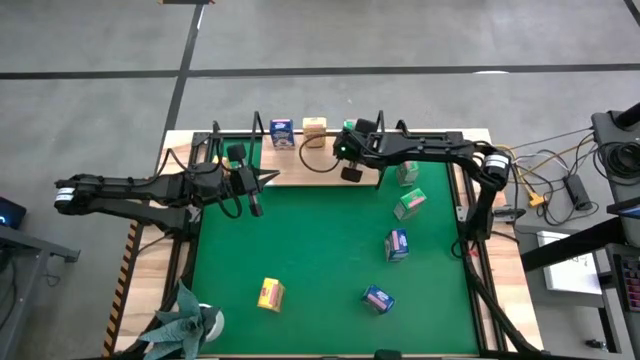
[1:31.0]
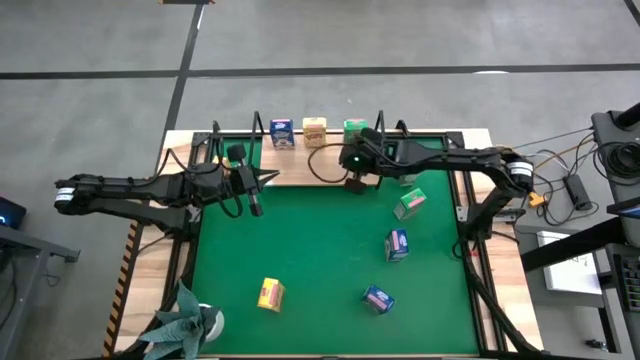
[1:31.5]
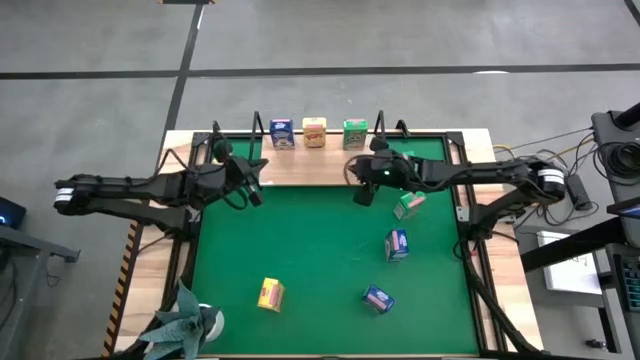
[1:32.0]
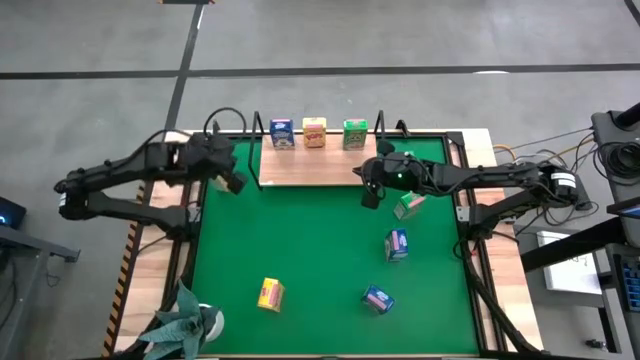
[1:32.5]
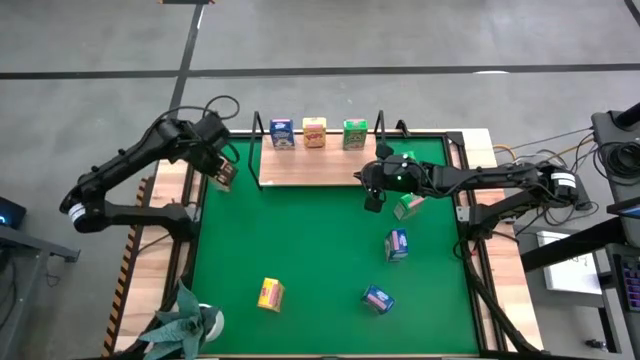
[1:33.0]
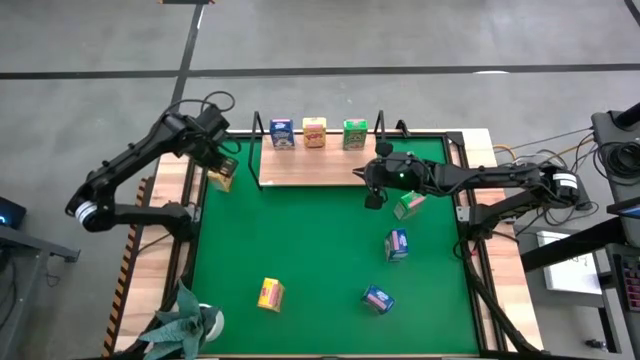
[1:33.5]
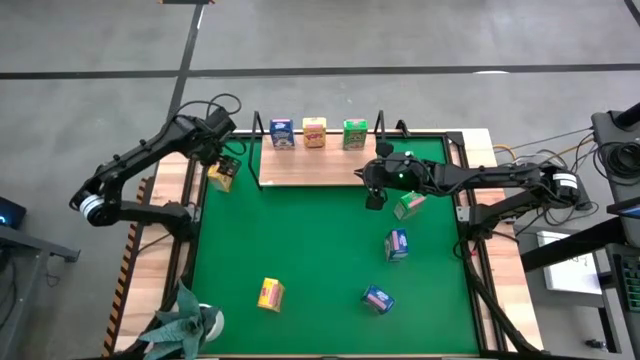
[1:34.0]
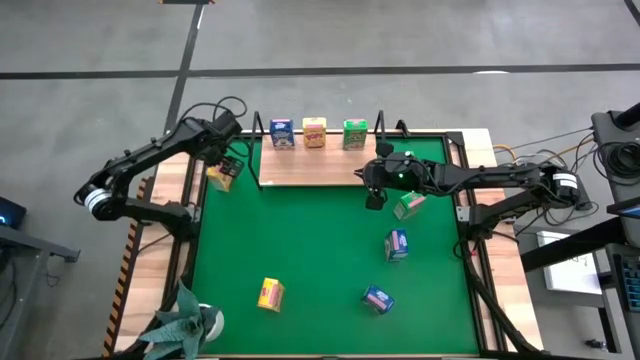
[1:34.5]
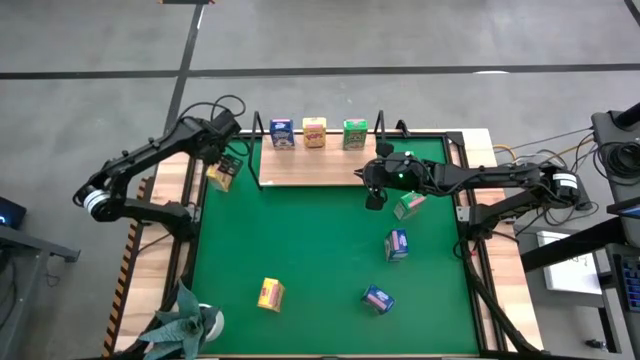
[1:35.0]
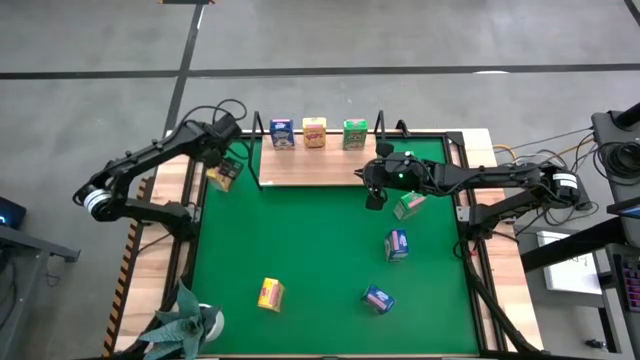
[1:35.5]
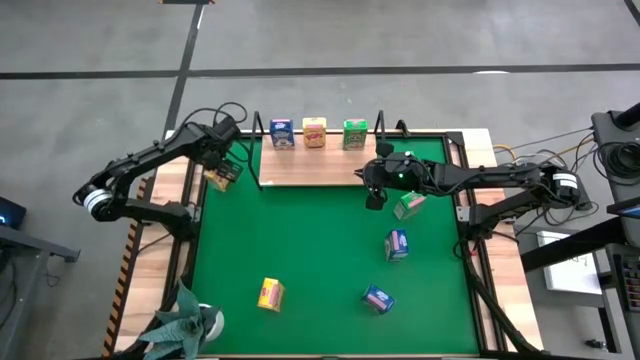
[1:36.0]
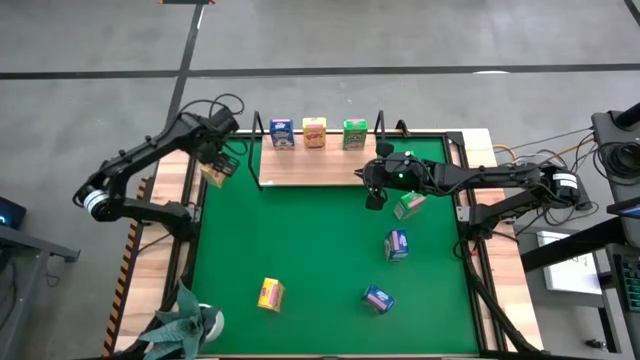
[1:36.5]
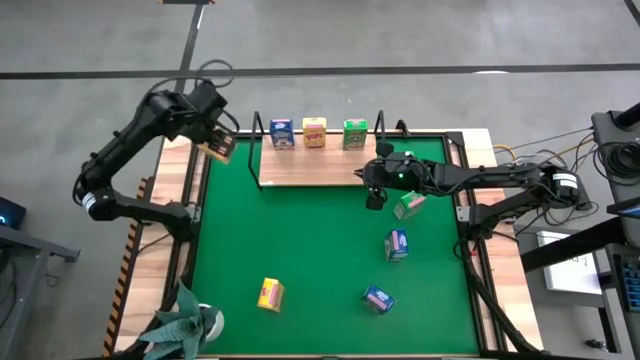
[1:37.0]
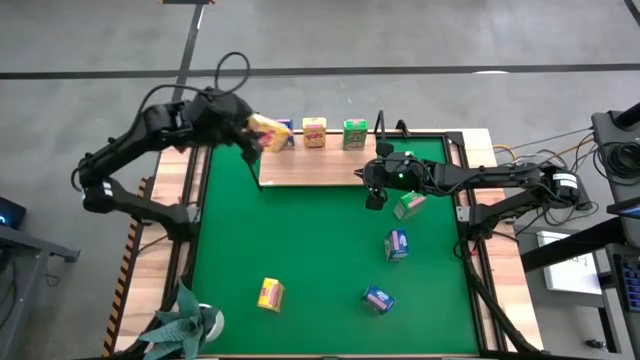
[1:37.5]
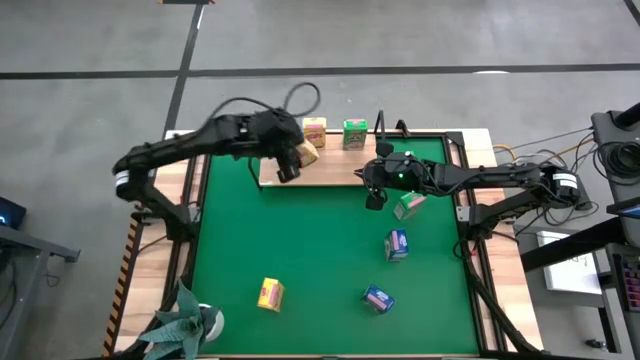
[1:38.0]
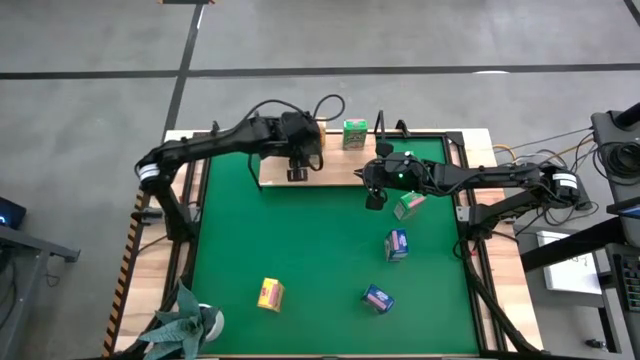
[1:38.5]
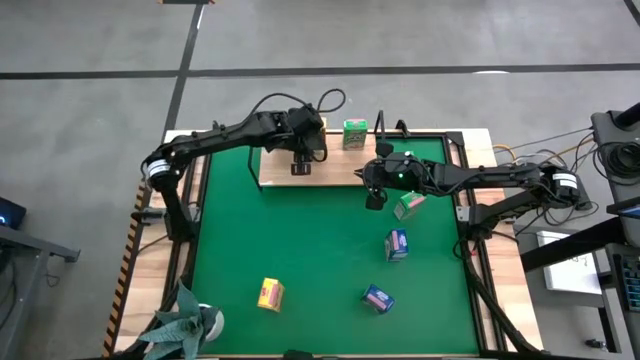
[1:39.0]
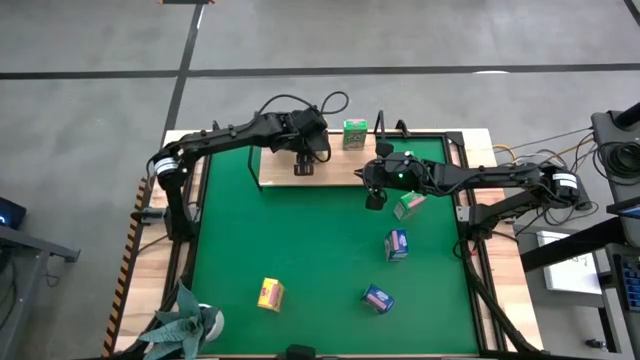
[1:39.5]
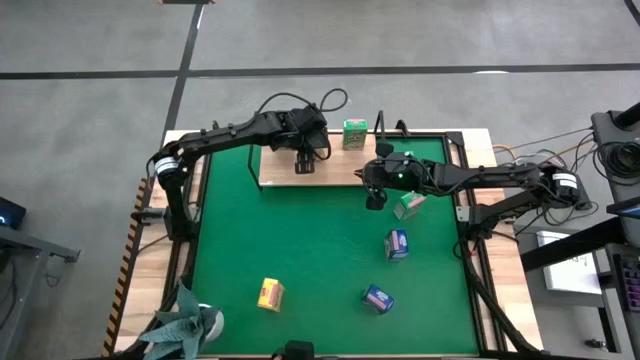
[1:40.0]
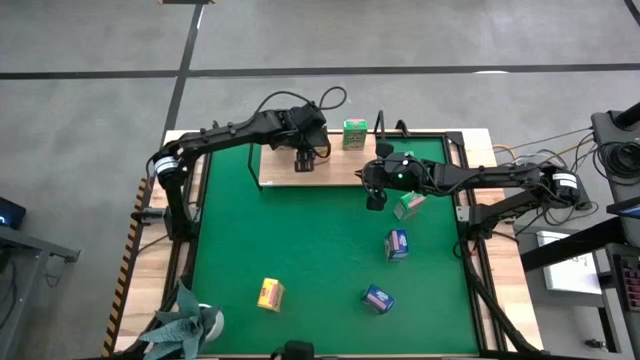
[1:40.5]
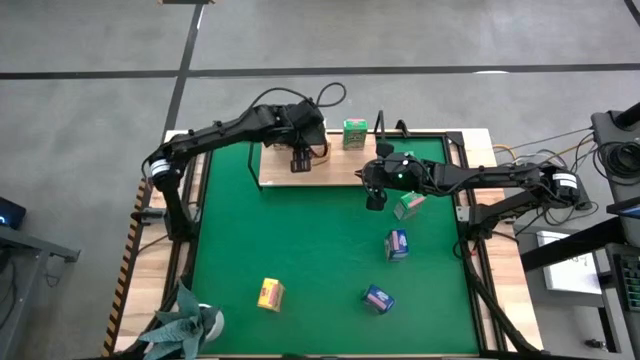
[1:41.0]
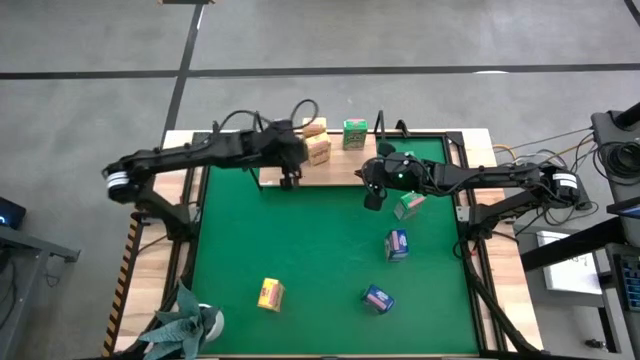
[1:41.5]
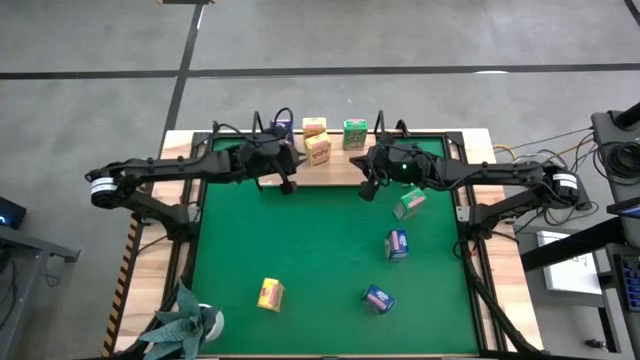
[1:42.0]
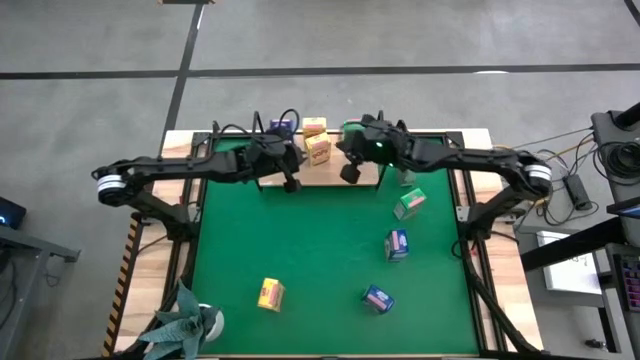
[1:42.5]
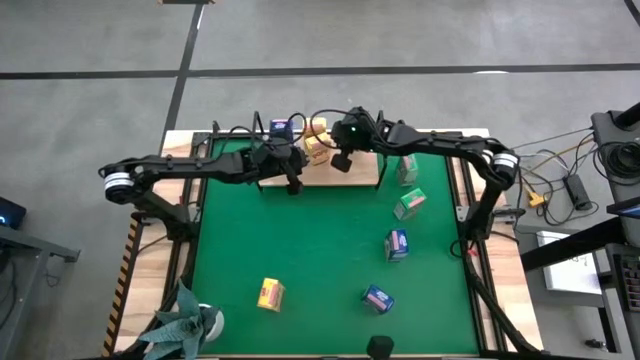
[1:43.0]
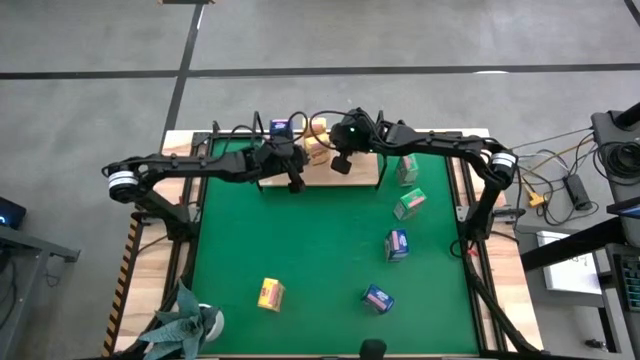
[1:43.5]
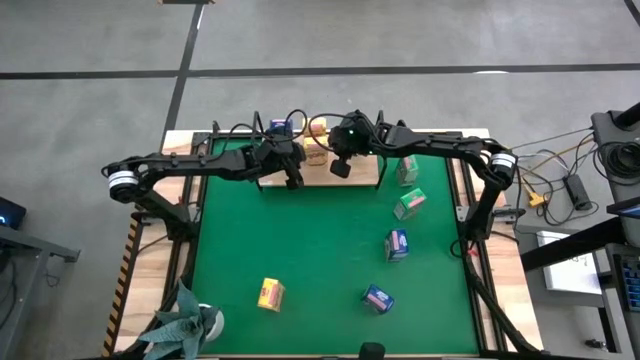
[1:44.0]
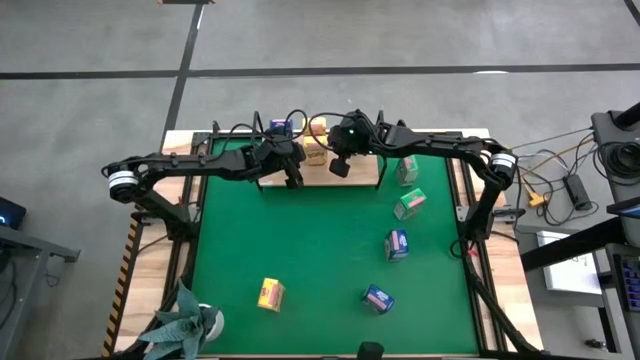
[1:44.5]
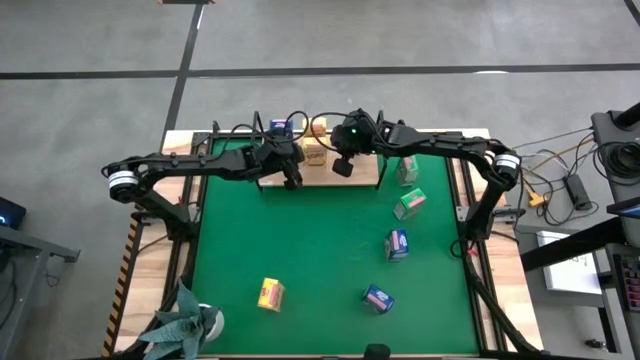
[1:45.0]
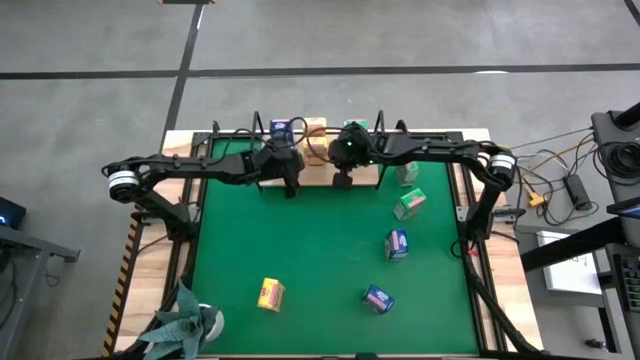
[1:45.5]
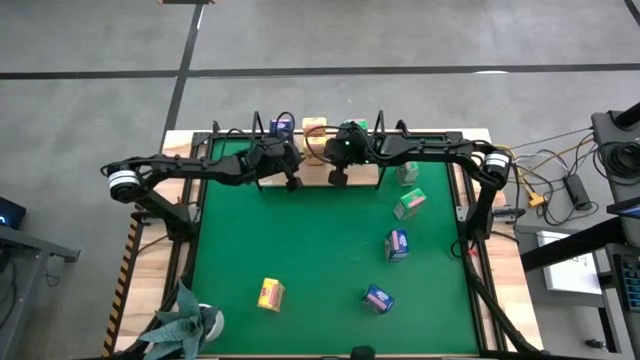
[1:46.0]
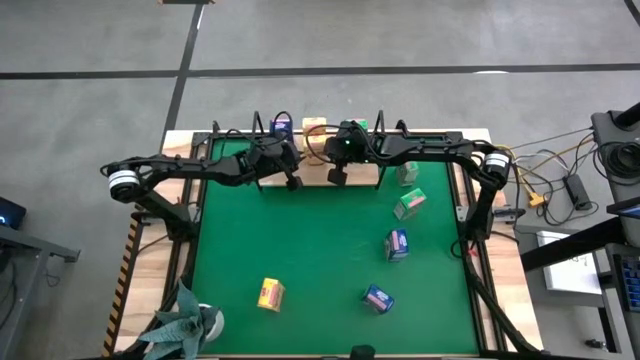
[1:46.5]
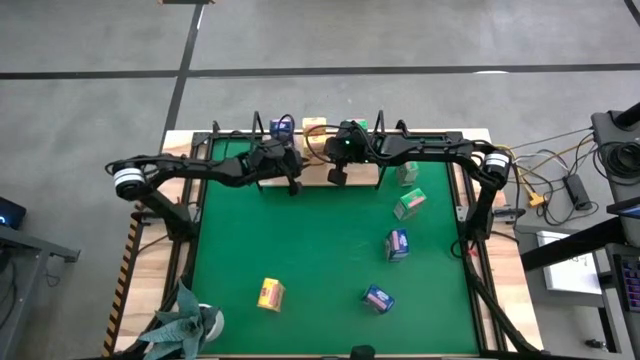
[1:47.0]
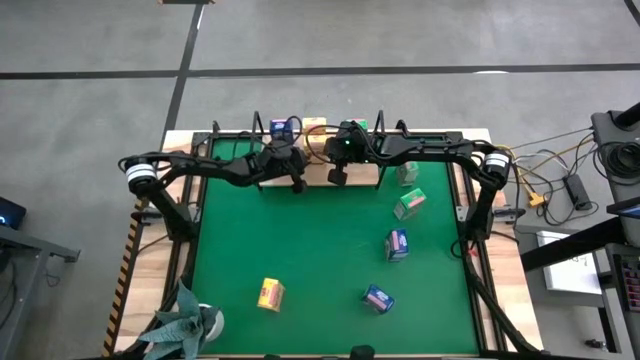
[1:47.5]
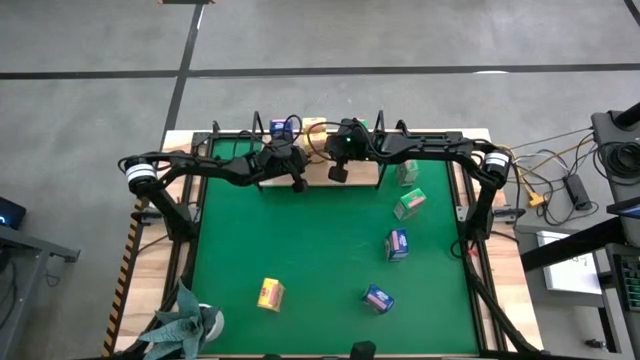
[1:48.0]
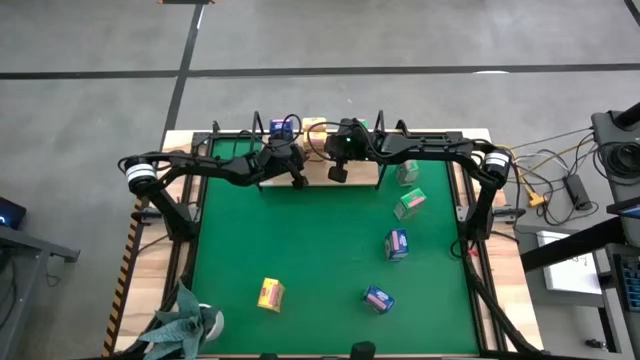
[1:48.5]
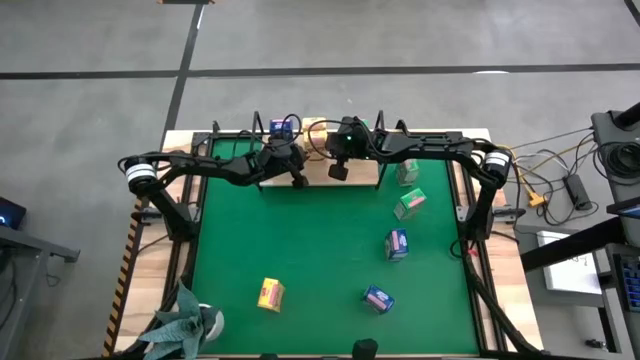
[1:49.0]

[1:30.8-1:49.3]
Task: Stack cereal on shelf
Put the top yellow cereal box on the shelf aligned with the other yellow cereal box

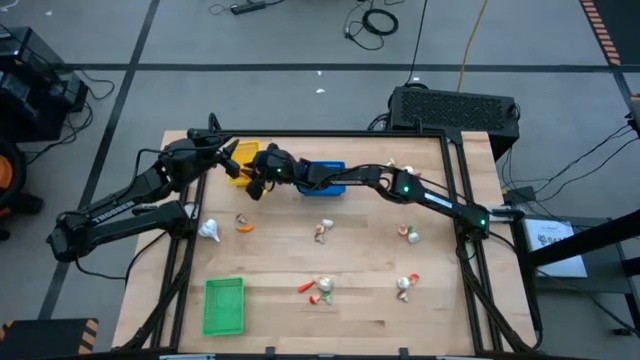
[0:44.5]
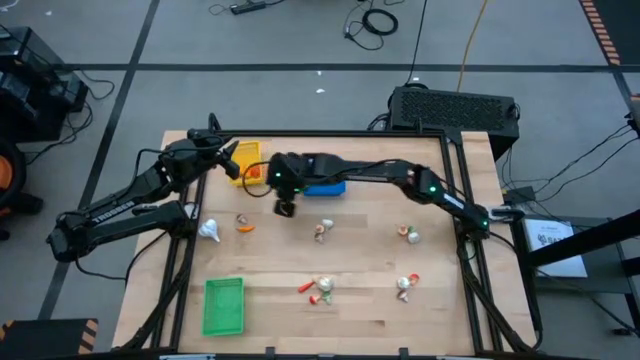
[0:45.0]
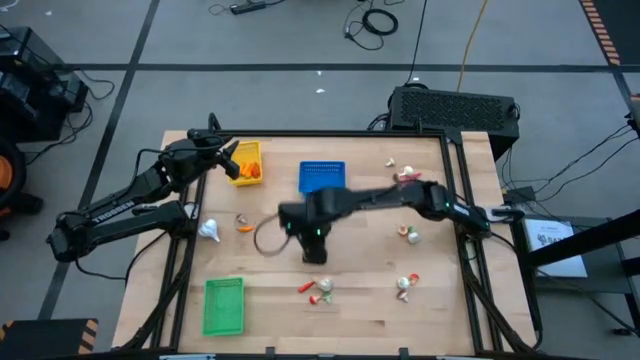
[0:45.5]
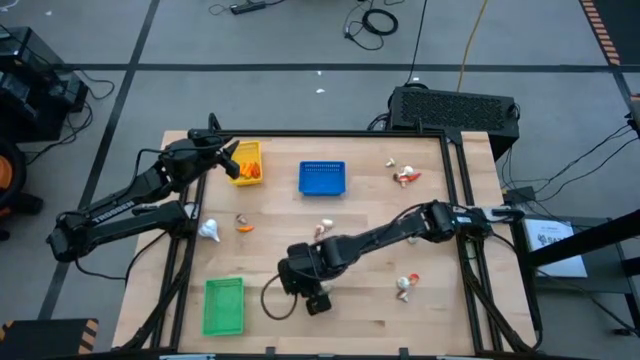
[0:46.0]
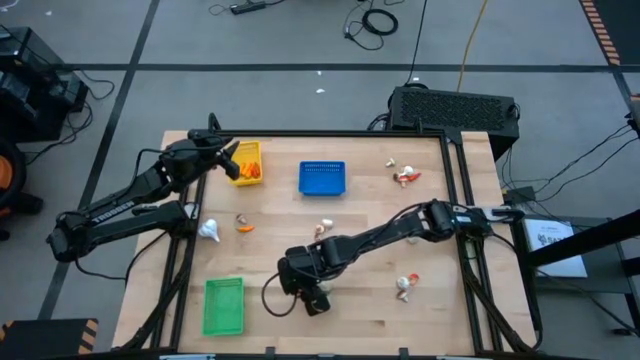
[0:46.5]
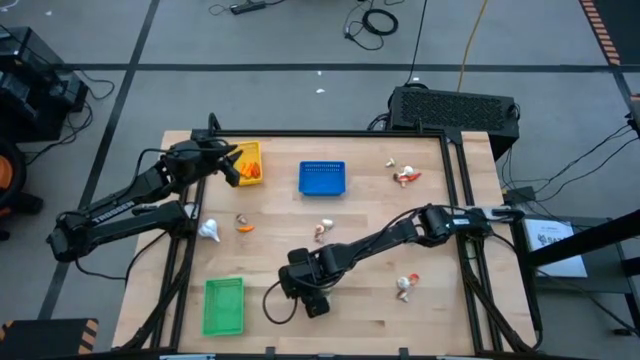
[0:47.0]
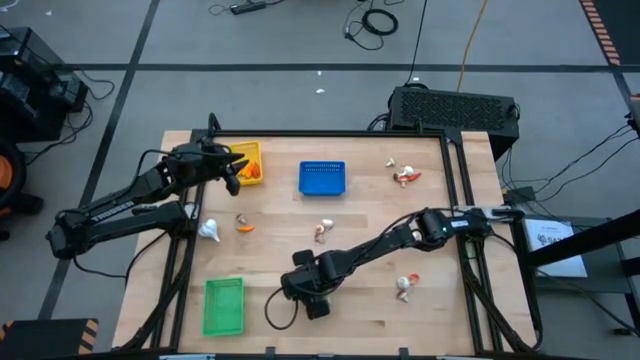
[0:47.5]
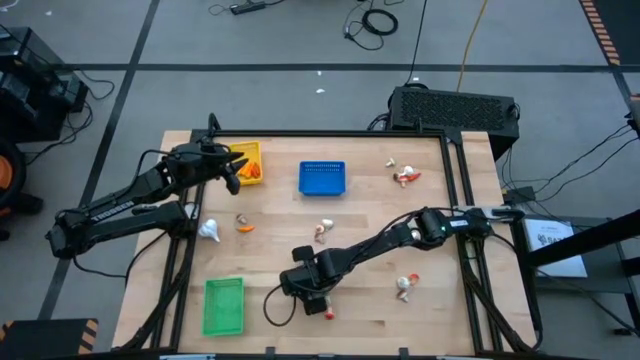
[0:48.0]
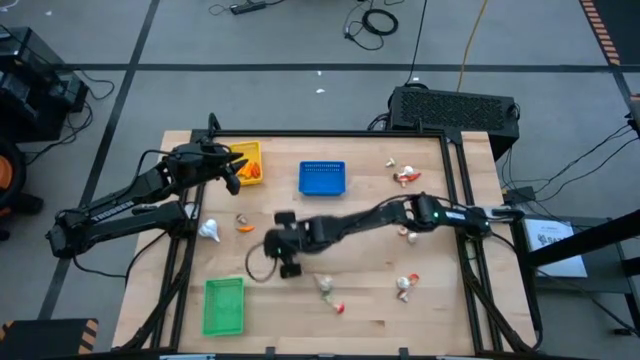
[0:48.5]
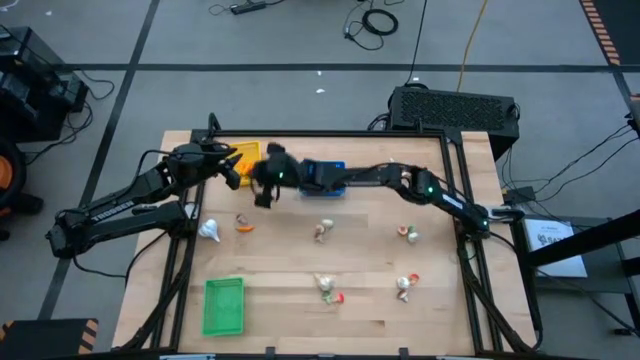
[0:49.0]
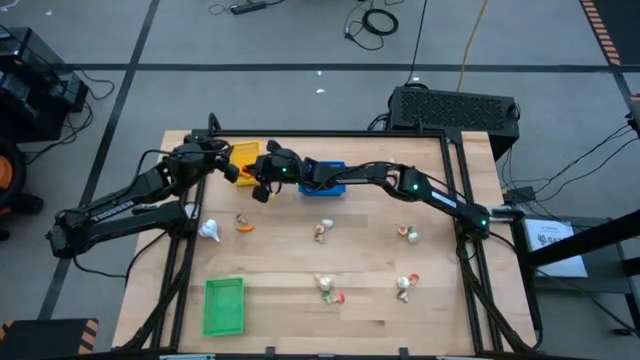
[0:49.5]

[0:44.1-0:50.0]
Task: Sort produce into baskets
Put the orange chili pepper into the yellow bin
